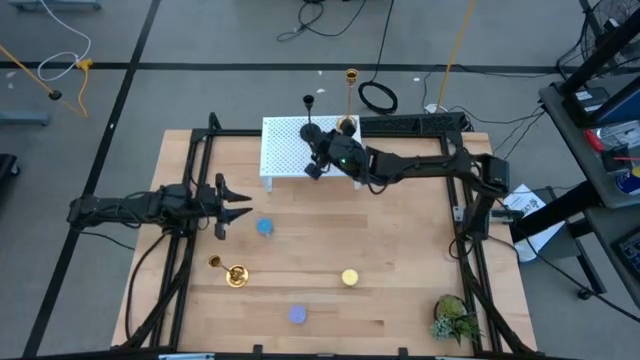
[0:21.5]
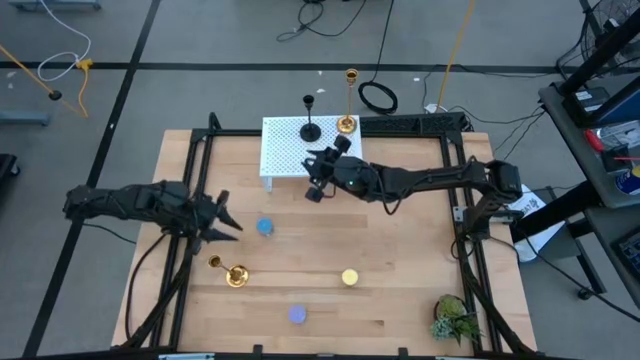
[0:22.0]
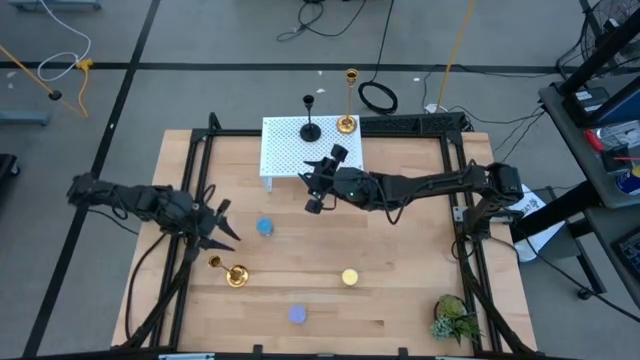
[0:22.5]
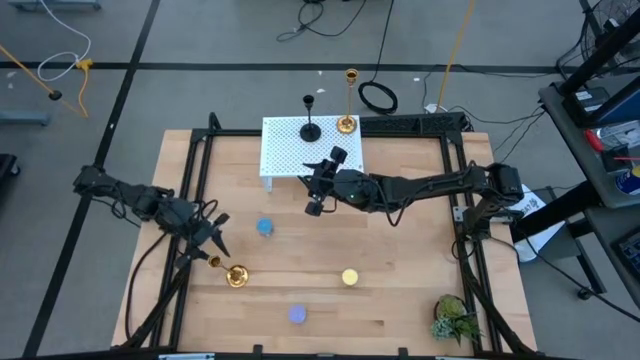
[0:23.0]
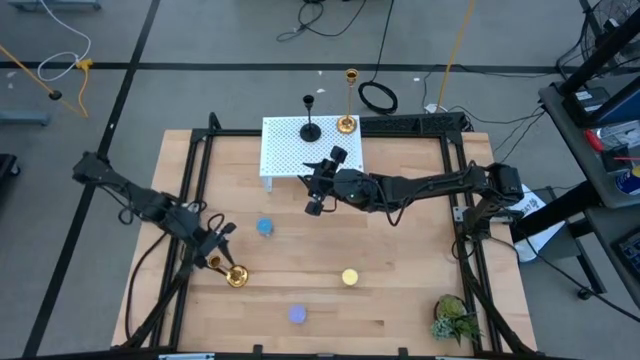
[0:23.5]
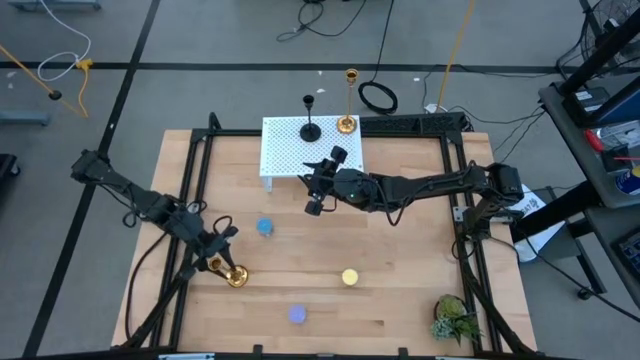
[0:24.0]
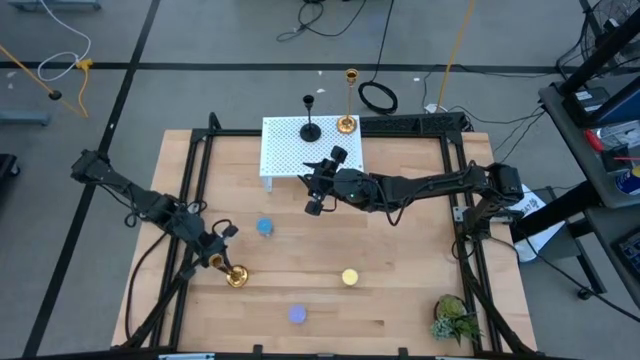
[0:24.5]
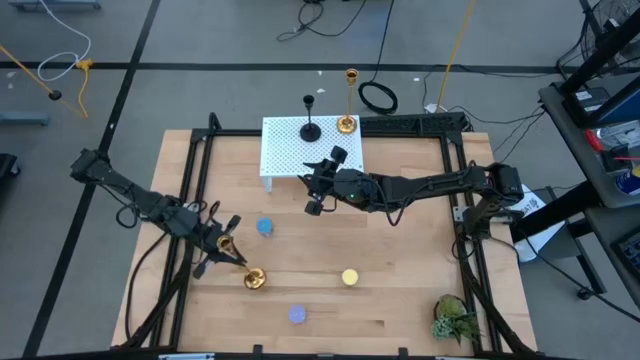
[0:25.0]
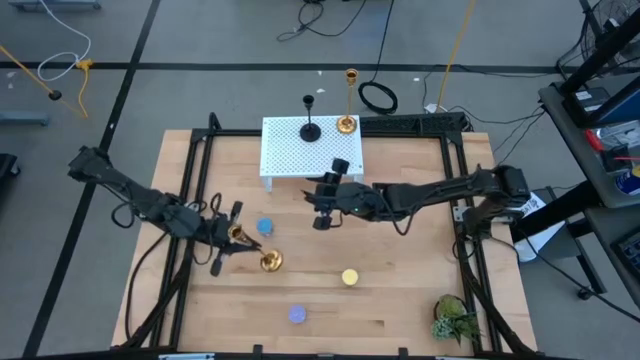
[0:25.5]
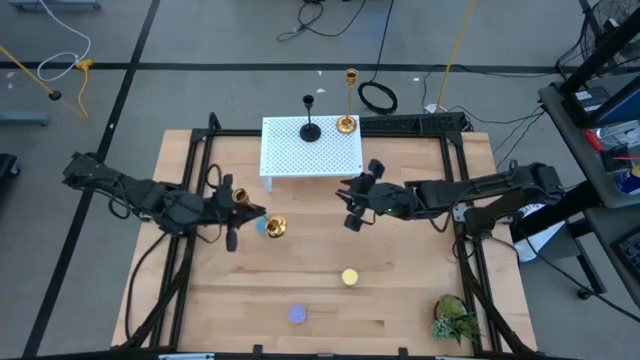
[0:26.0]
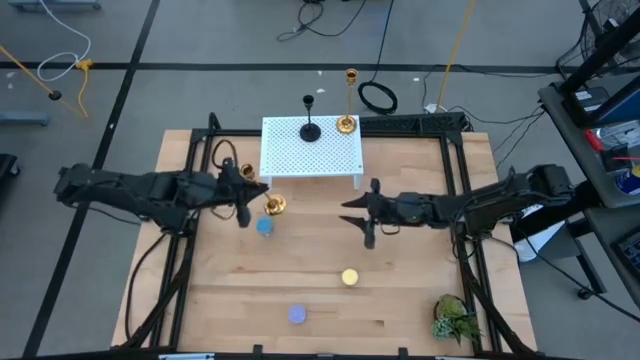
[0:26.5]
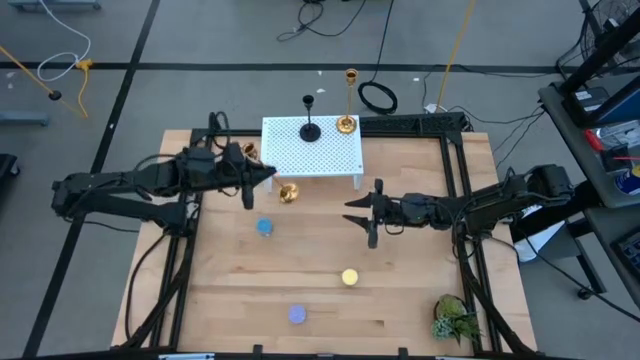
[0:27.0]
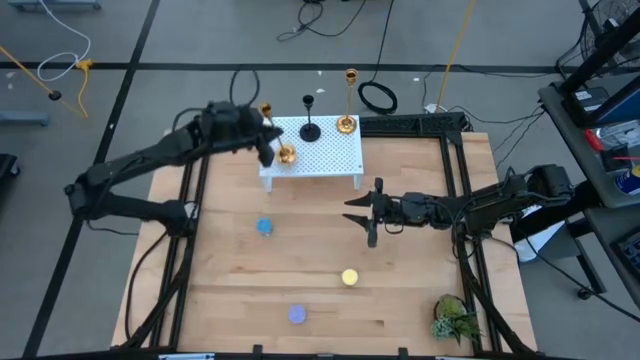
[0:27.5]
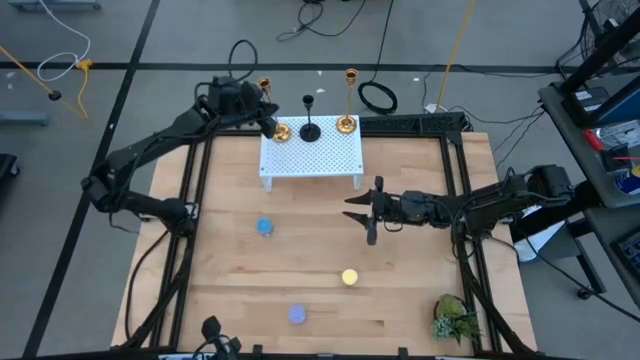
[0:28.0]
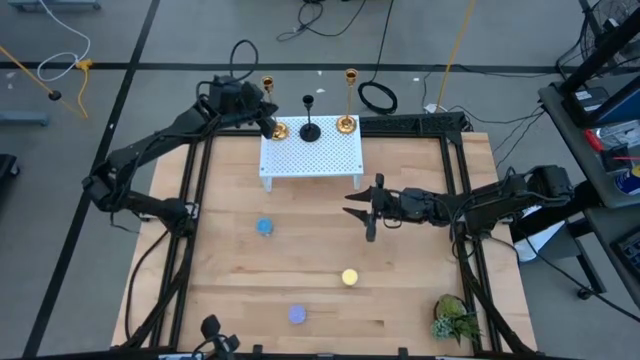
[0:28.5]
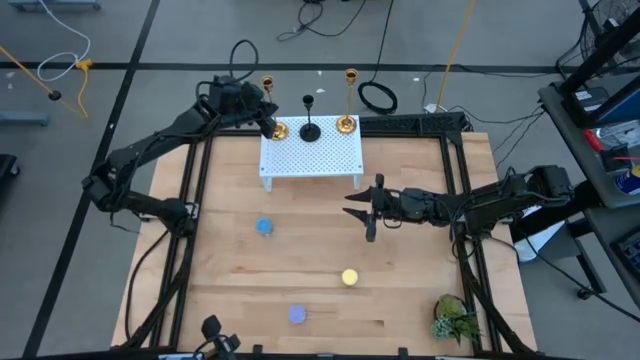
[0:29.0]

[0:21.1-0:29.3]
Task: Pick & Place candle stick holders
Put the golden candle holder on the shelf

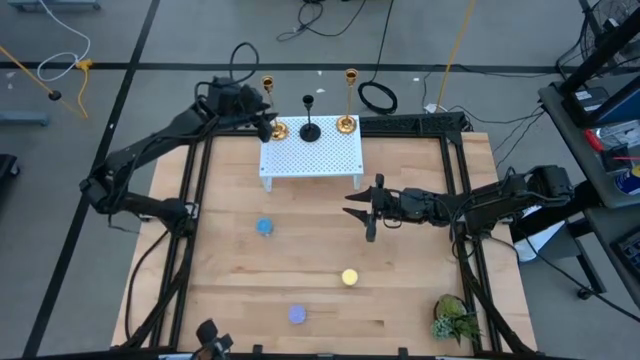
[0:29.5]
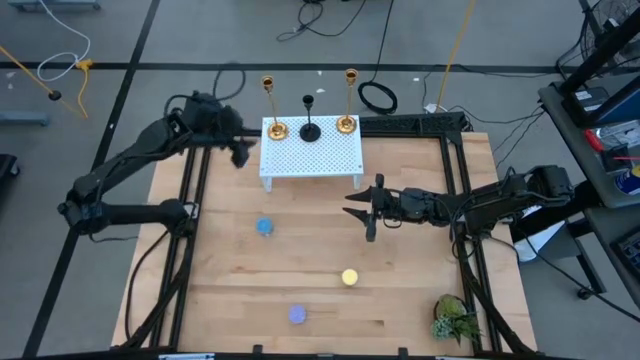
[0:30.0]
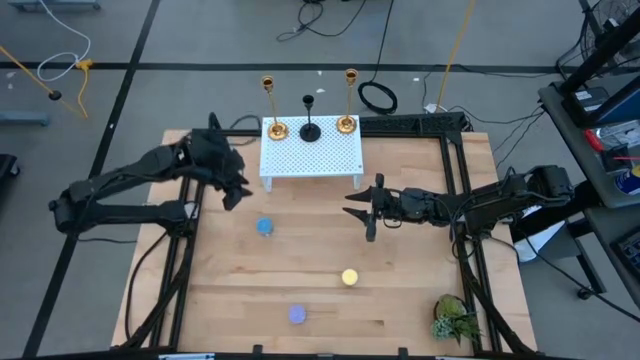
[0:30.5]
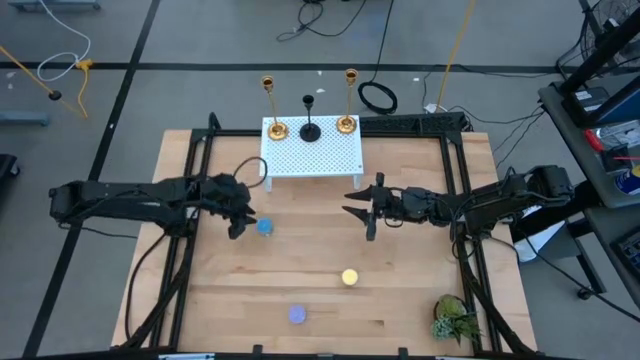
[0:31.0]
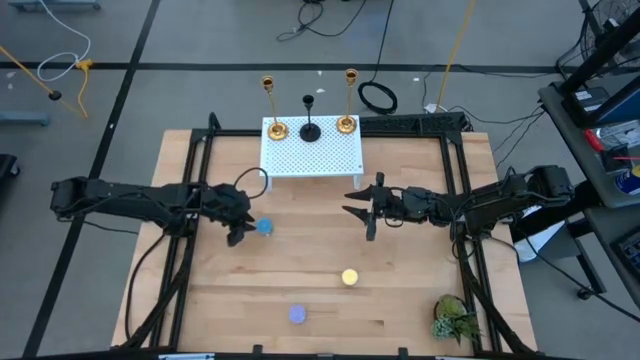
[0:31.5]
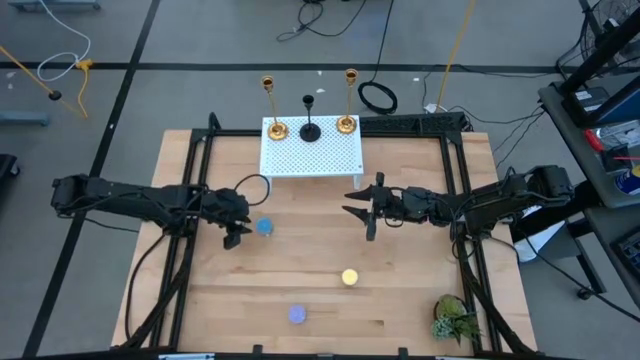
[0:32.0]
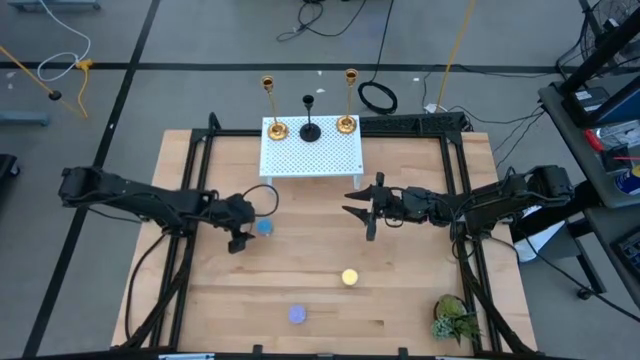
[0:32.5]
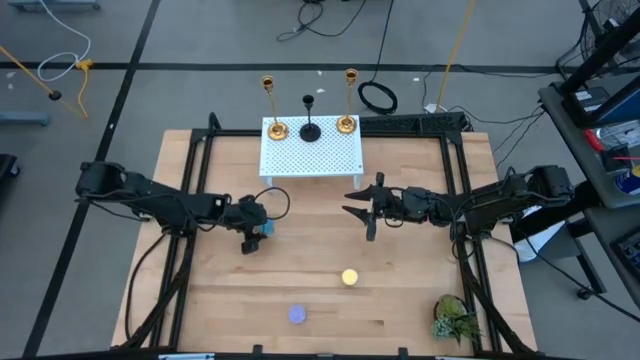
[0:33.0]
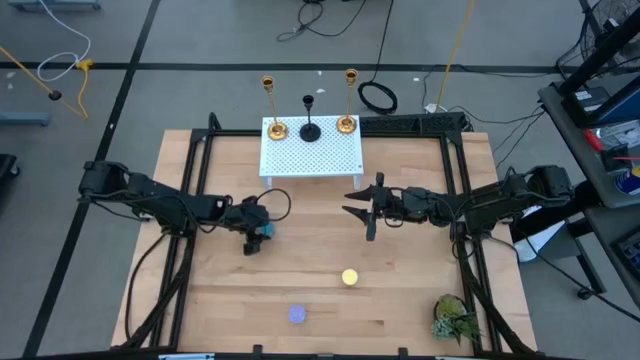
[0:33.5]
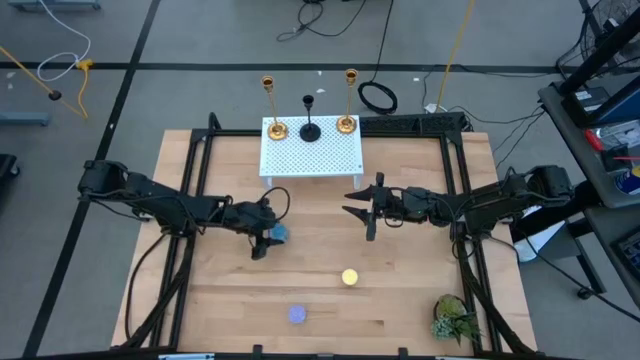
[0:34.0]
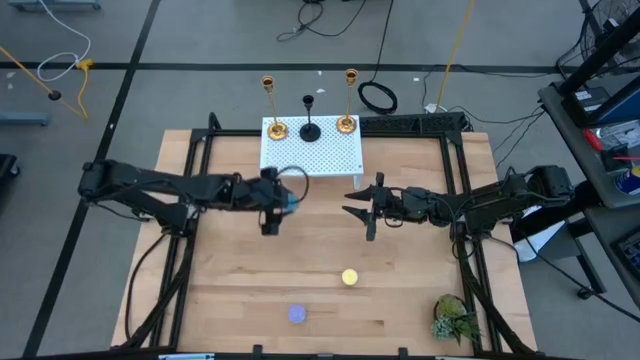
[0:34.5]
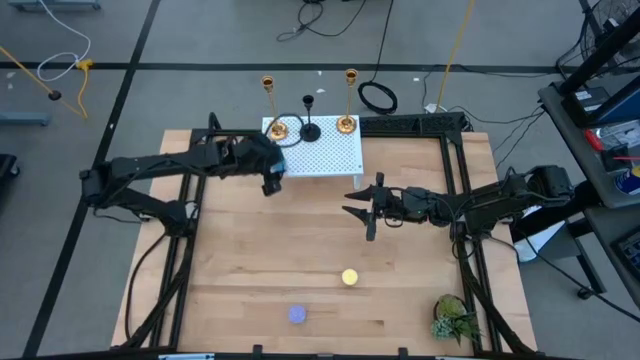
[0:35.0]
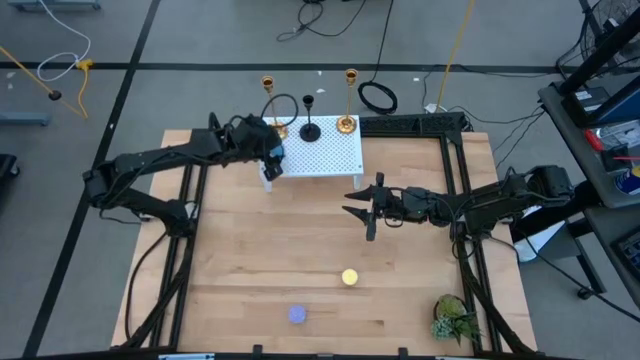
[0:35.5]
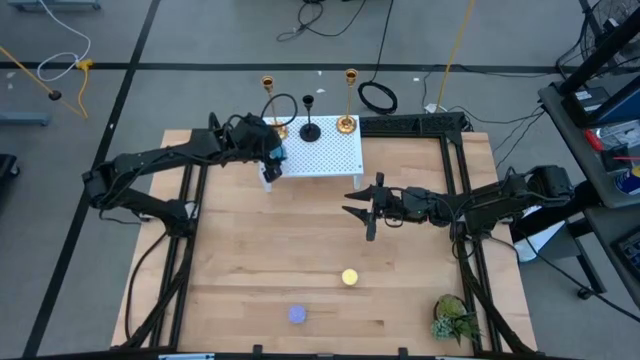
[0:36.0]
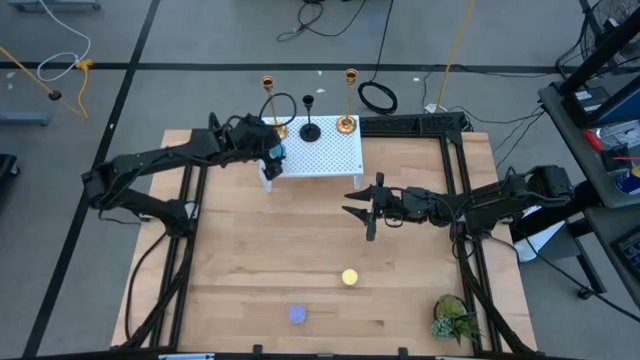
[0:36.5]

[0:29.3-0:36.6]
Put the blue scented candle on the shelf aligned with the left golden candle holder

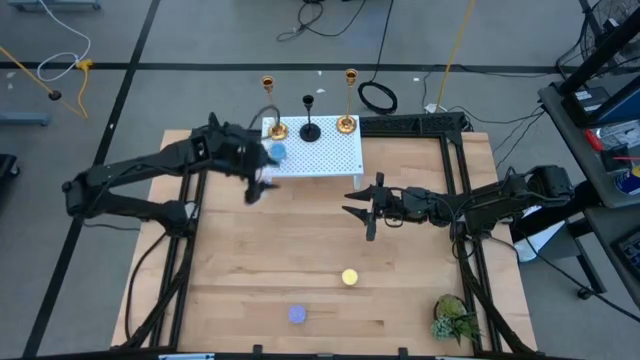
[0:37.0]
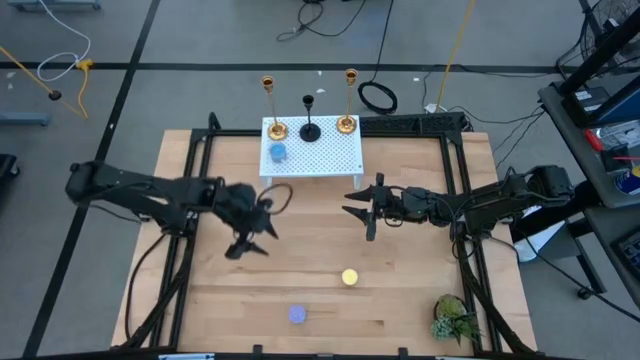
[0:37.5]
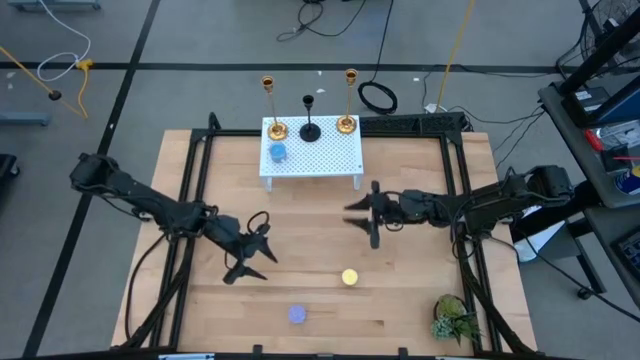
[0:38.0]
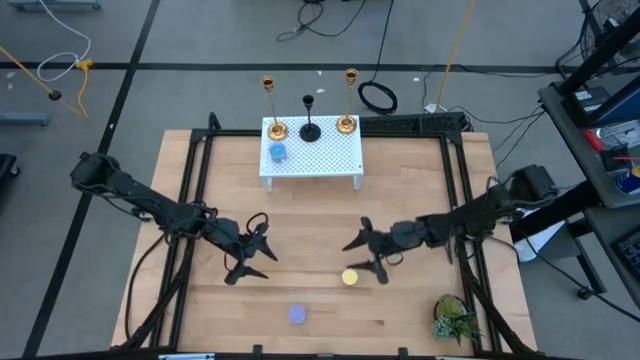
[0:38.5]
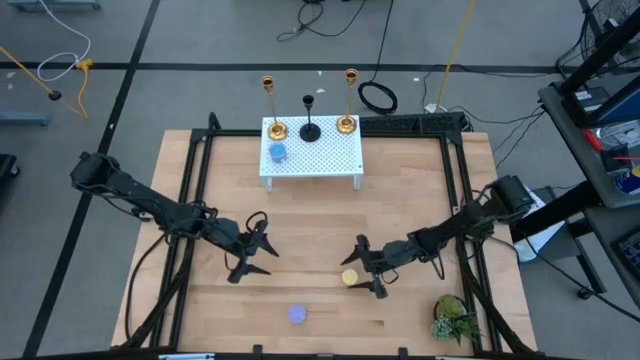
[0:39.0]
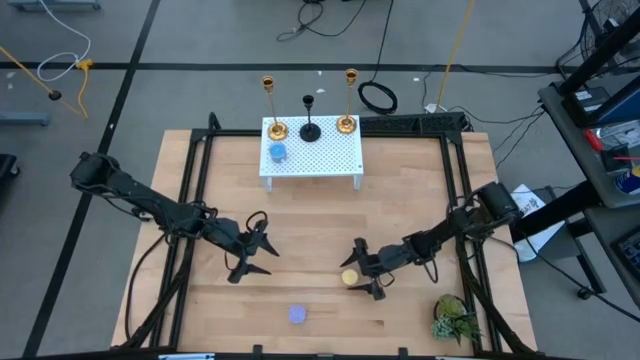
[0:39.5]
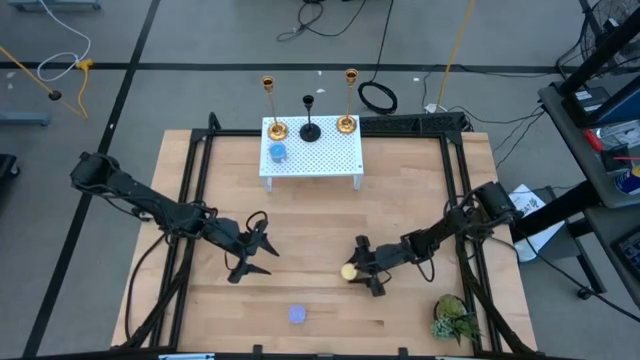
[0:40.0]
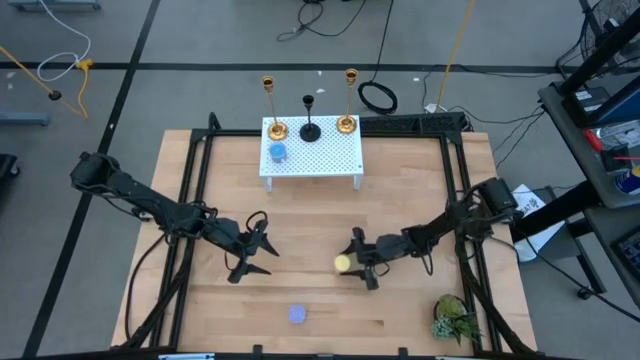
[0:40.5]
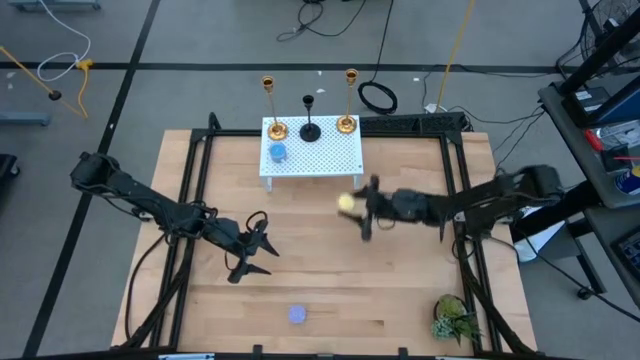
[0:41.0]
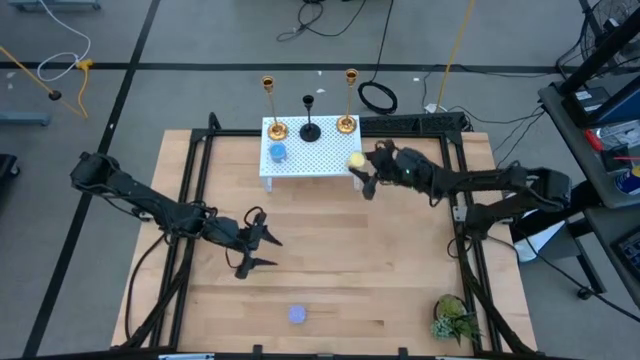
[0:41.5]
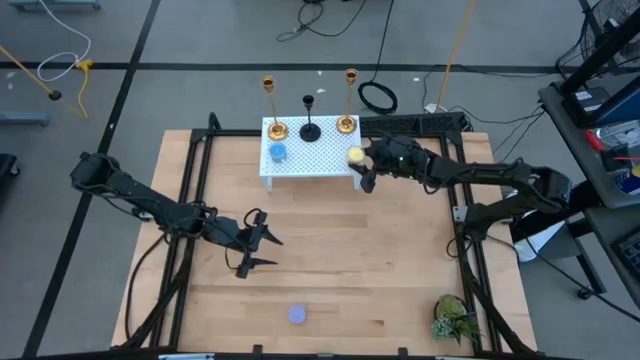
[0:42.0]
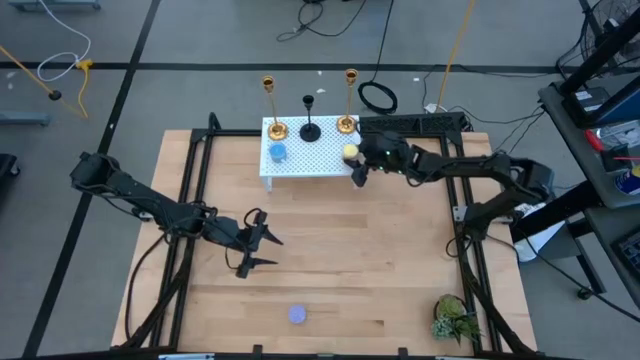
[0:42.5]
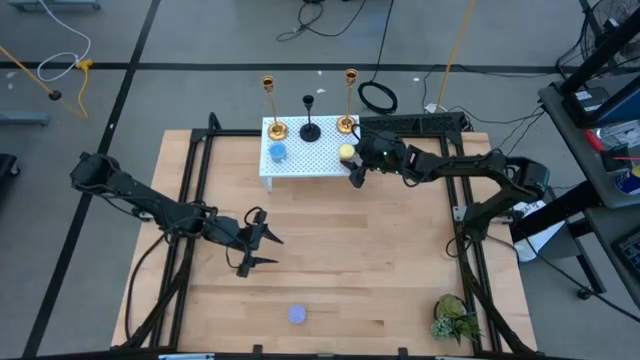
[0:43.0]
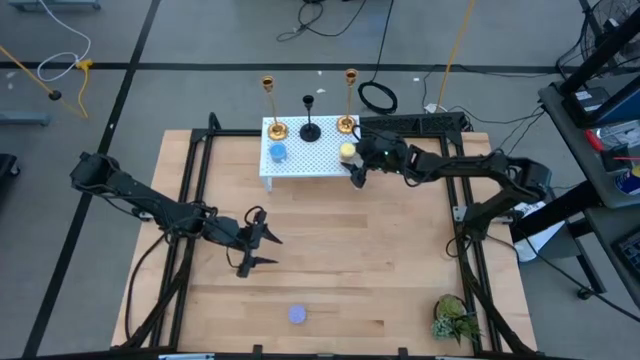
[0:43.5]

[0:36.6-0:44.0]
Put the yellow scented candle on the shelf aligned with the right golden candle holder
